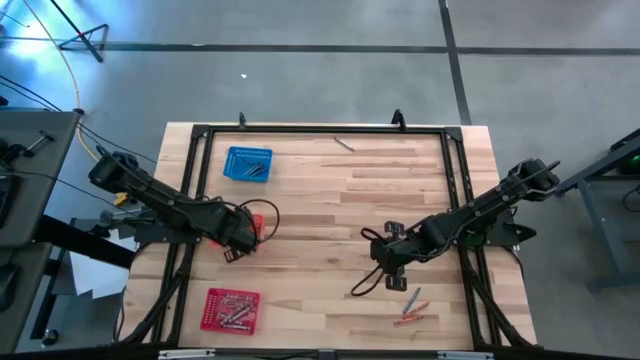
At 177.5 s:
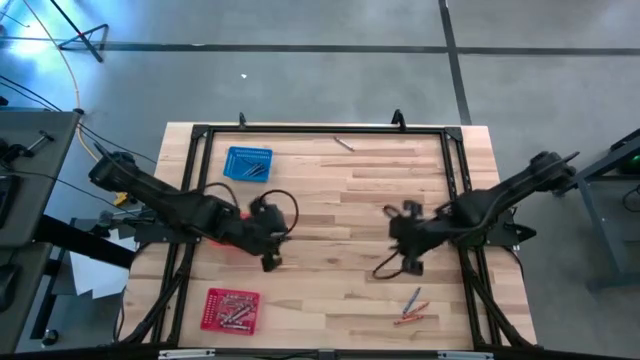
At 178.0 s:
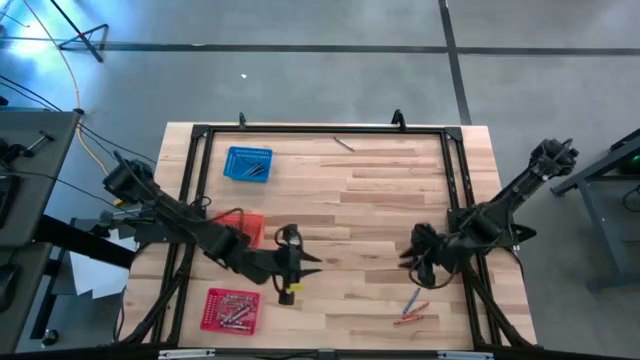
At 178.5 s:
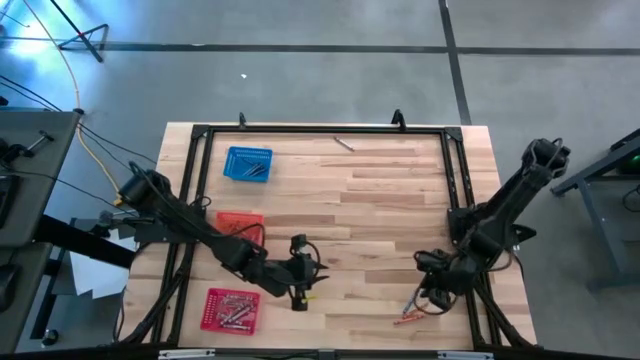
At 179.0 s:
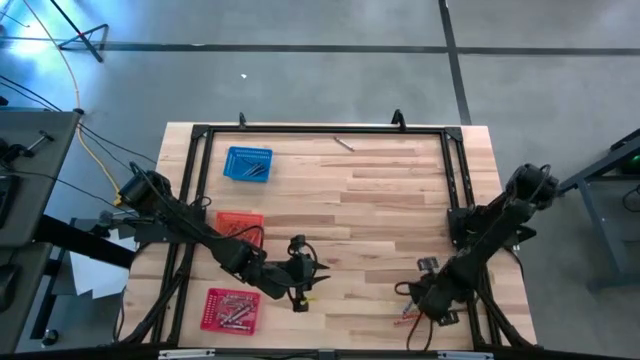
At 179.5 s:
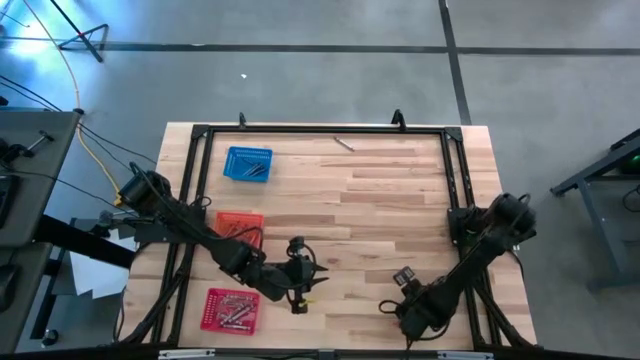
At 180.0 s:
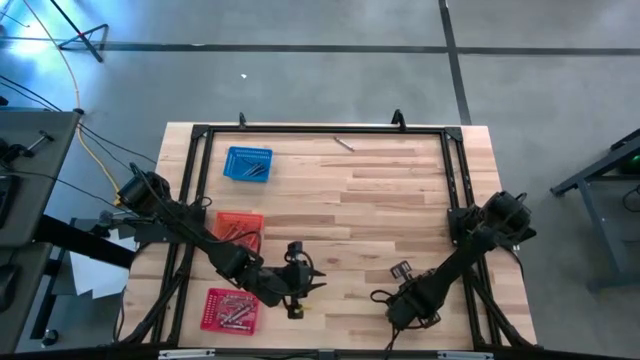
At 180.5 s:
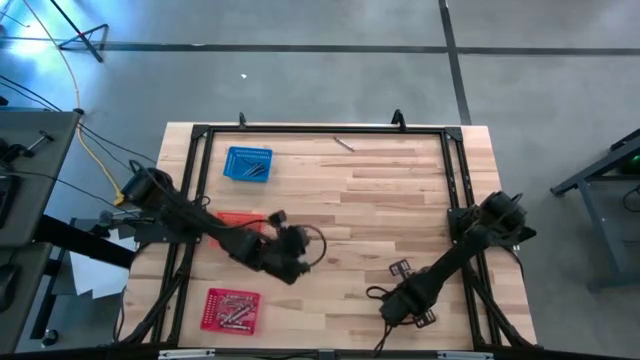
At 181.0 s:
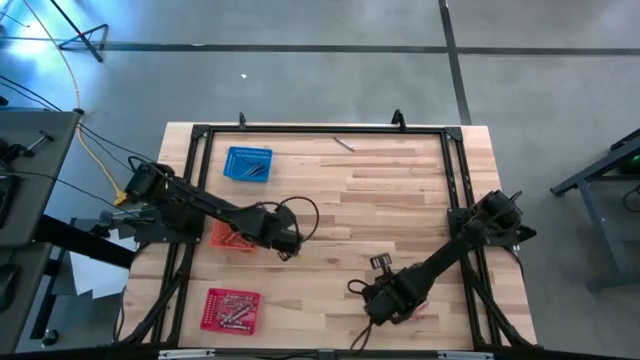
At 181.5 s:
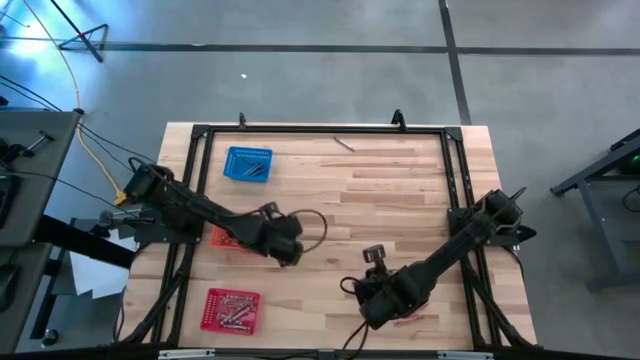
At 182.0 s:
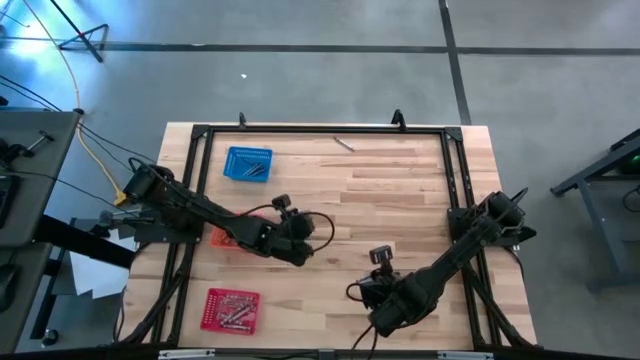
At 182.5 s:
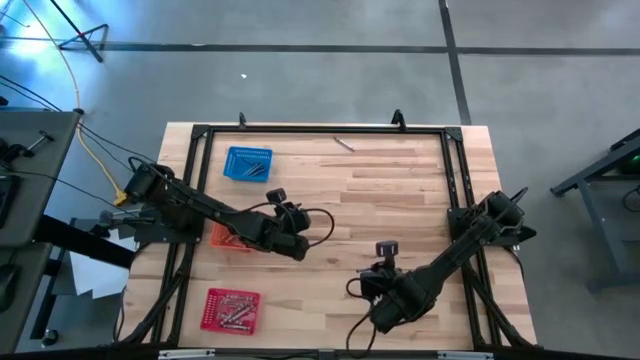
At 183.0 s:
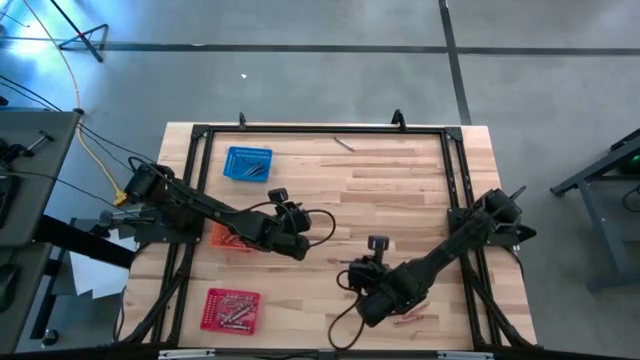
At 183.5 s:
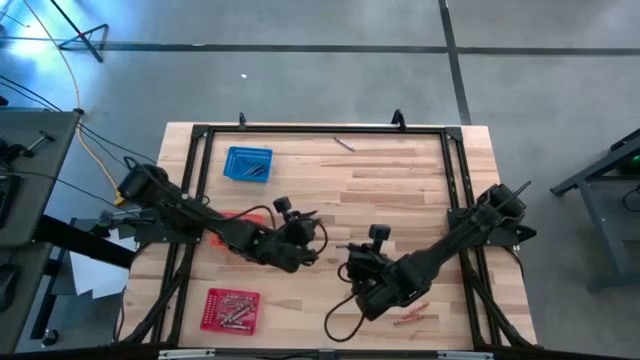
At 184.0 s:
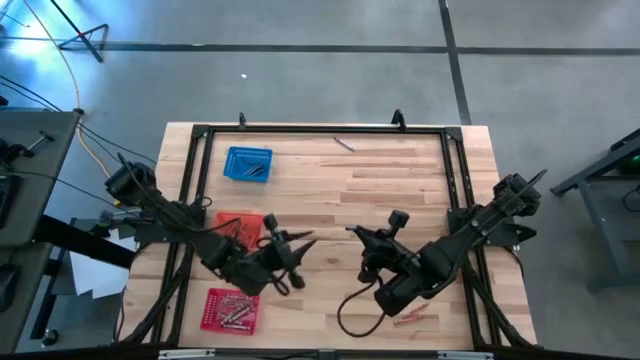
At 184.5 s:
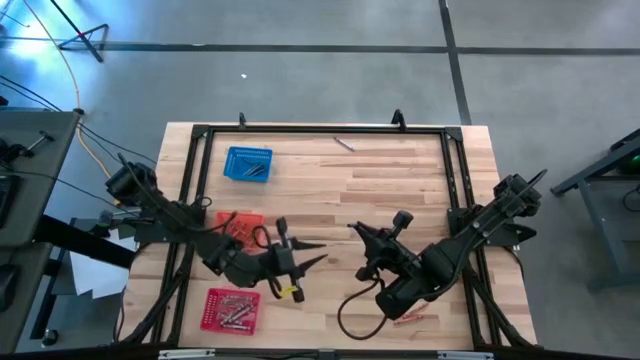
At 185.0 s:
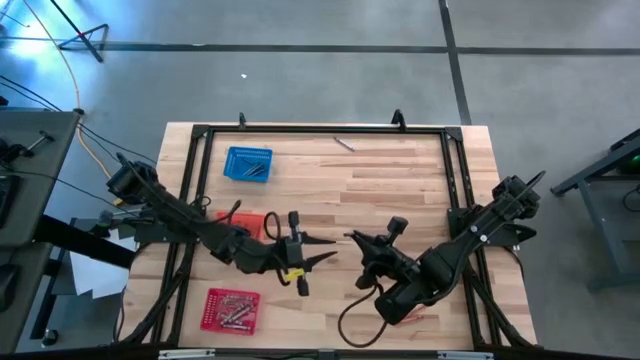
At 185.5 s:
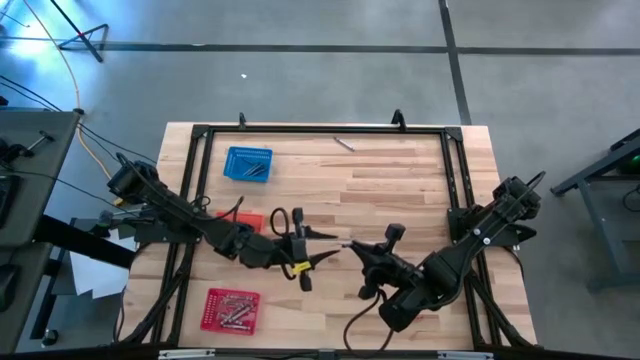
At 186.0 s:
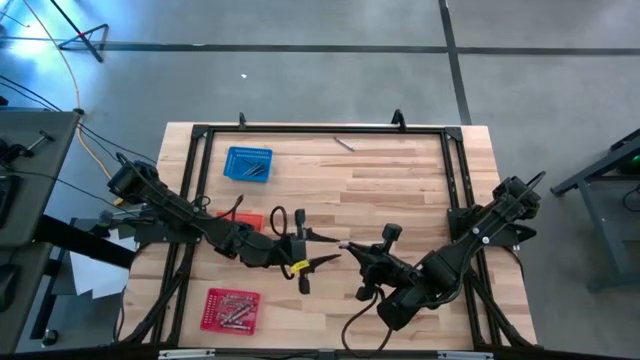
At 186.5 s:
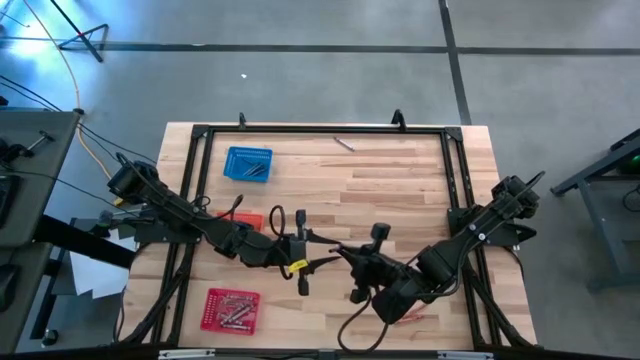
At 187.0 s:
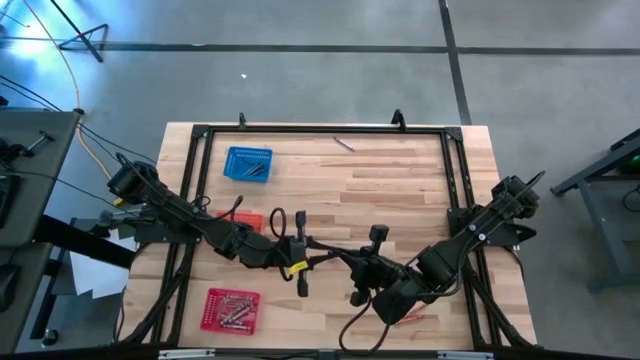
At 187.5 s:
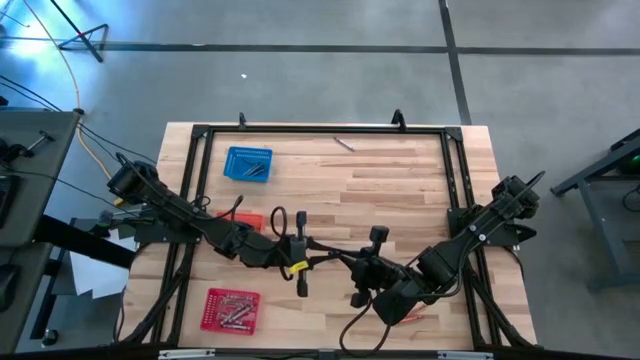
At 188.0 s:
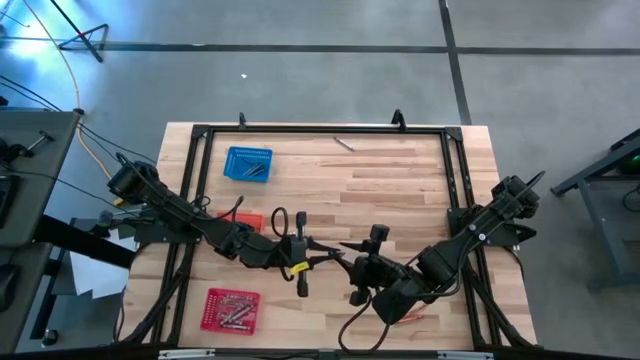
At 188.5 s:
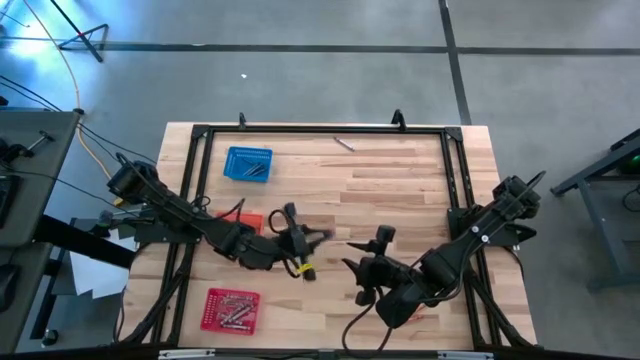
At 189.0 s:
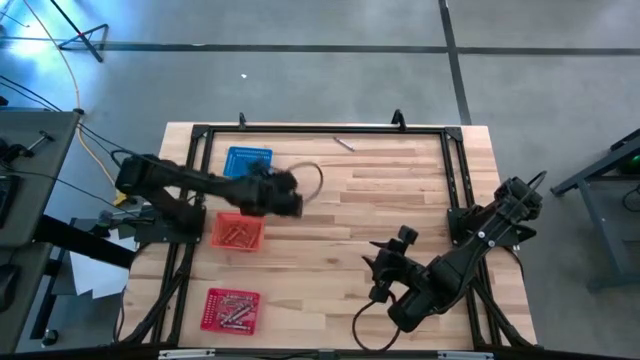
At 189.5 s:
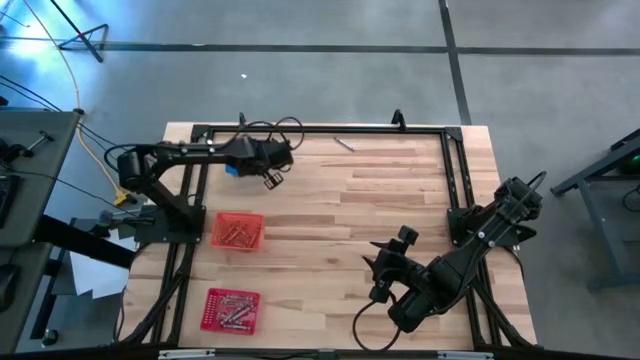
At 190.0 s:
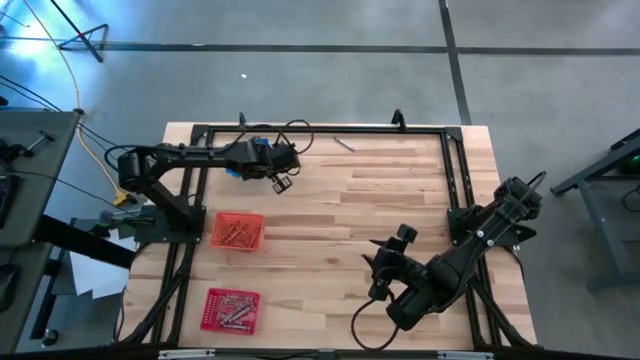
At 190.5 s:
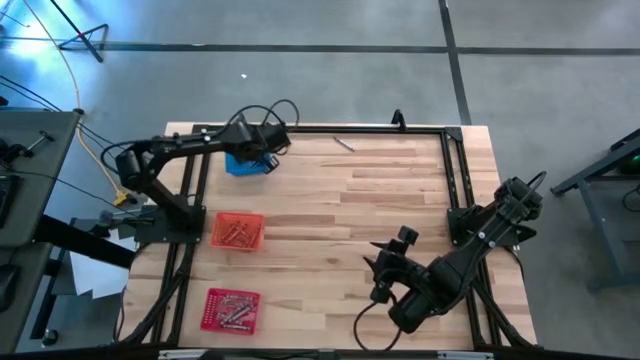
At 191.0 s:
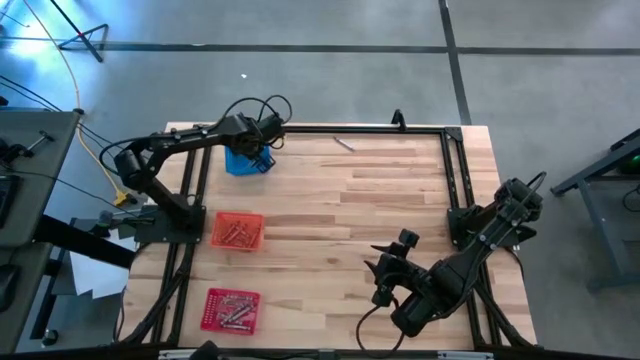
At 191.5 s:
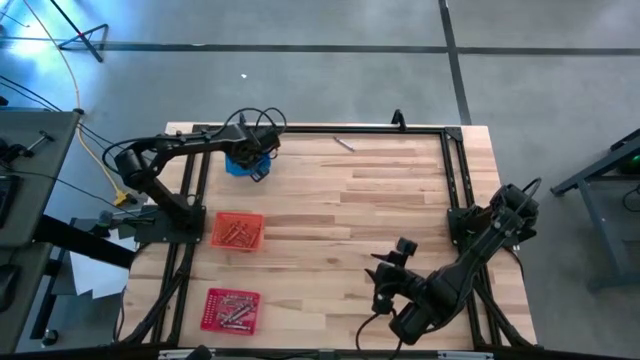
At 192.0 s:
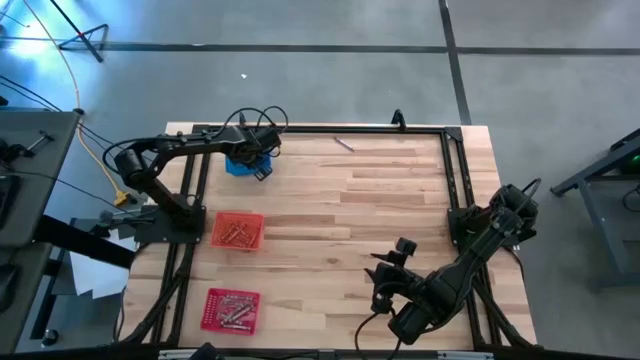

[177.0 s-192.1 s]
Task: Sort crayons
Put the blue crayon into the blue bin

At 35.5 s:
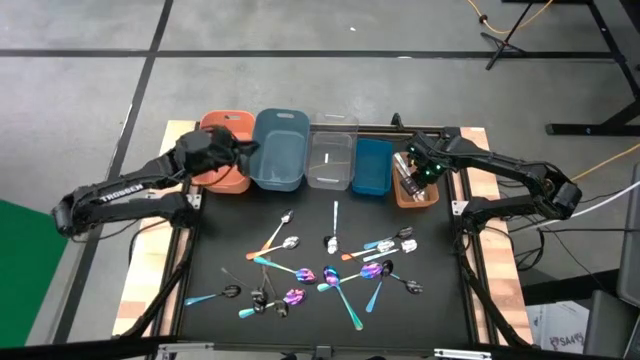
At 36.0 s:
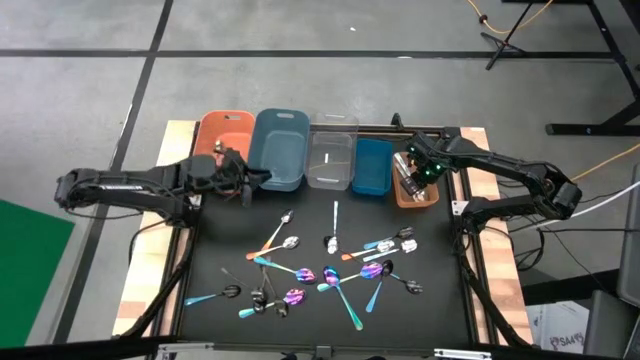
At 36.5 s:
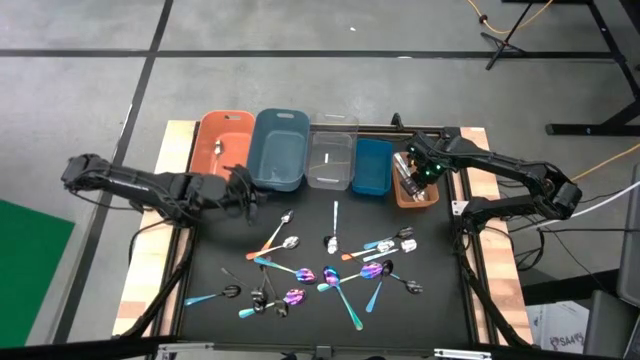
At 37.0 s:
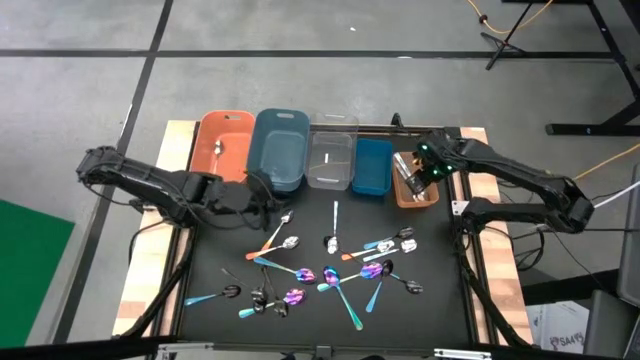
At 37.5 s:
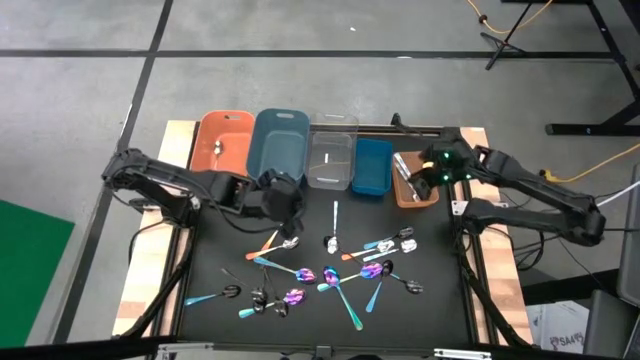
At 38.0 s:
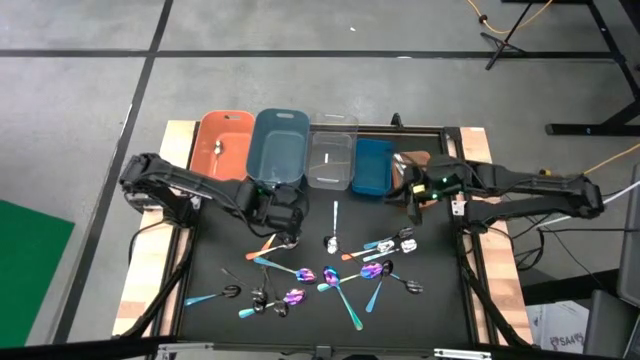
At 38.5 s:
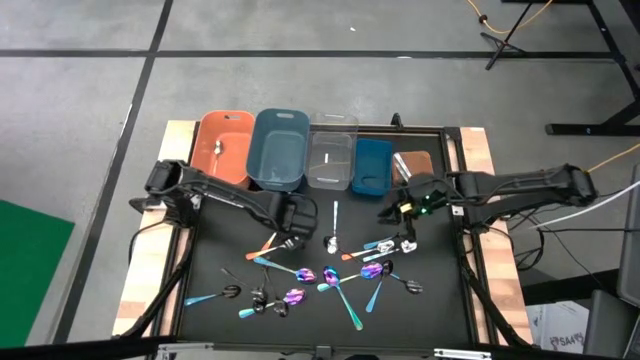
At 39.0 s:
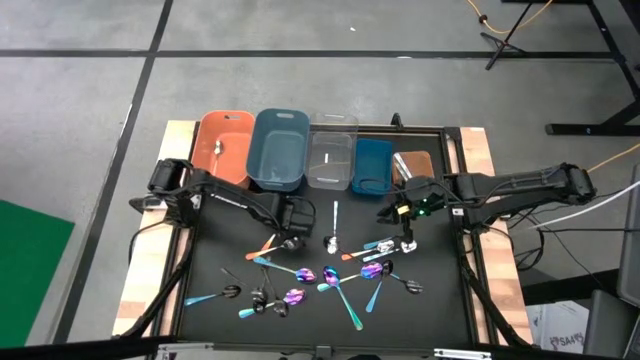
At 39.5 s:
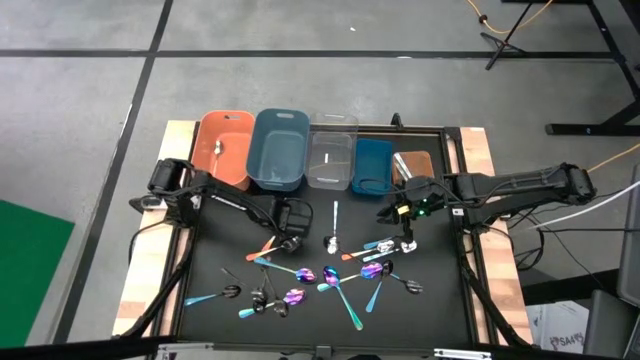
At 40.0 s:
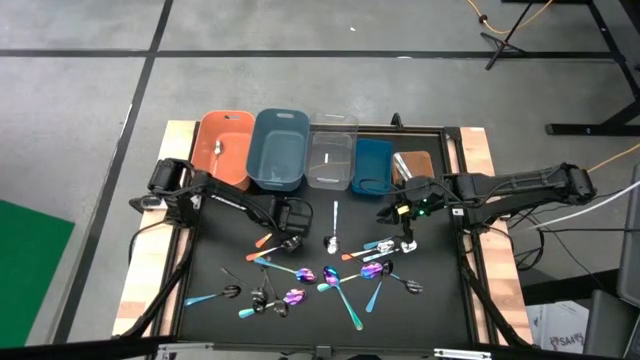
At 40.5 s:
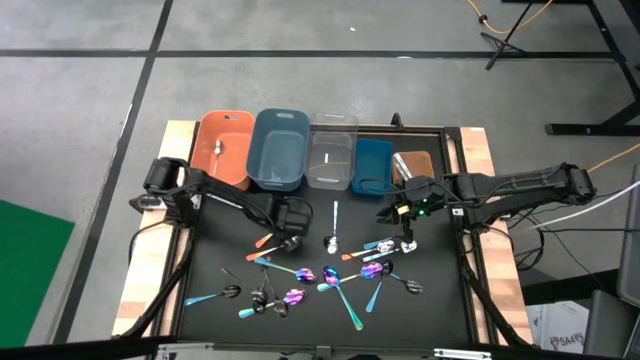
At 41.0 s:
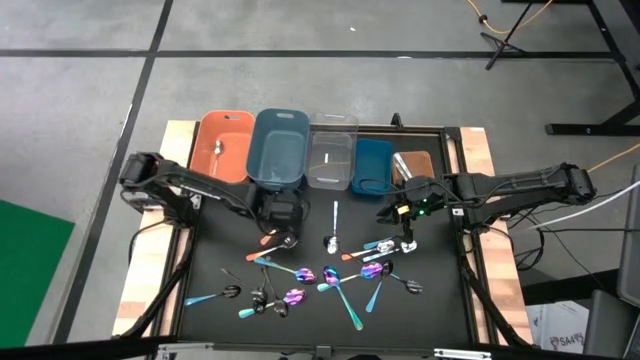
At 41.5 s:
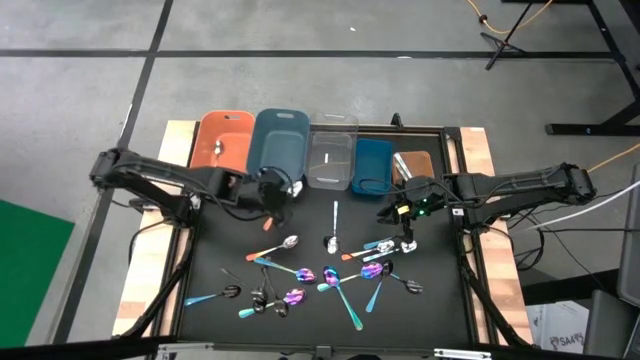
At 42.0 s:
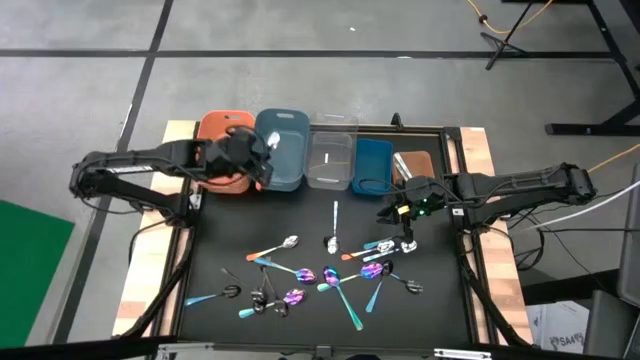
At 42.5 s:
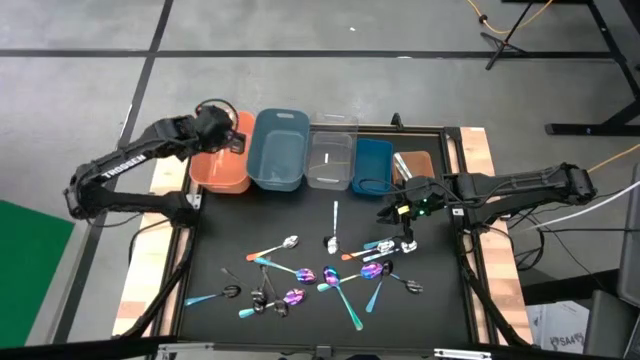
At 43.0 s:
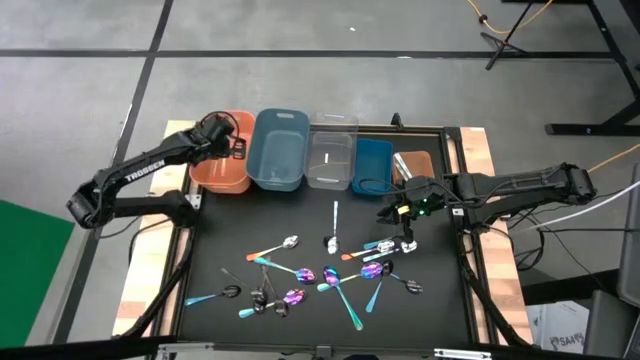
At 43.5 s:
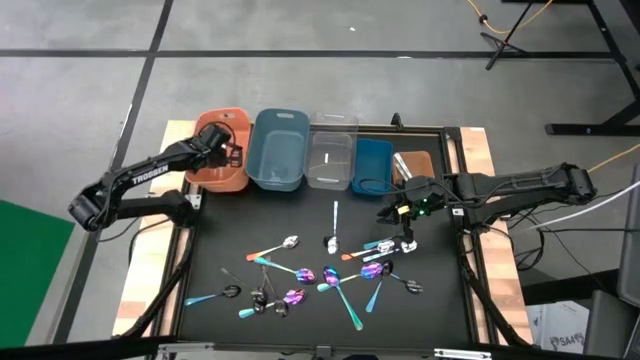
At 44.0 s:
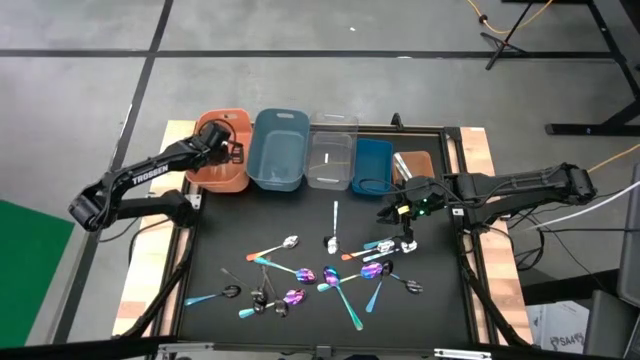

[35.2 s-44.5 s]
Task: Sort silverware by color (type)
Put the orange spoon into the left orange bin
